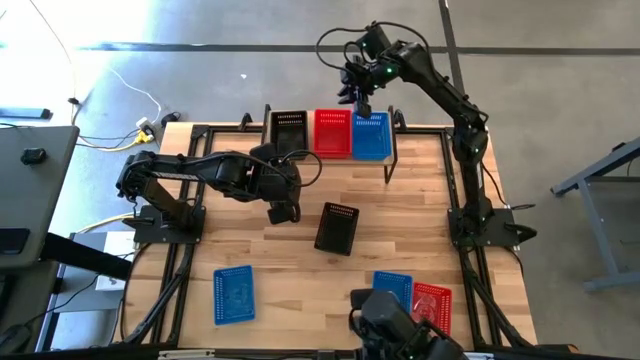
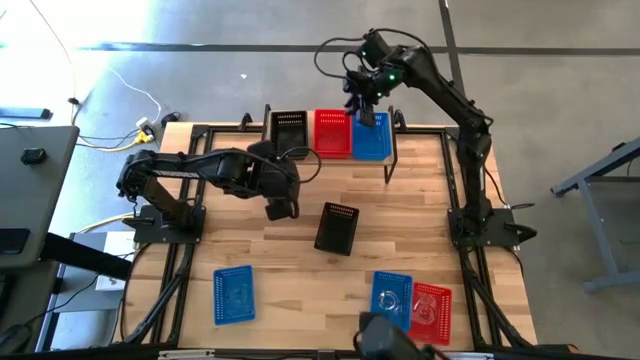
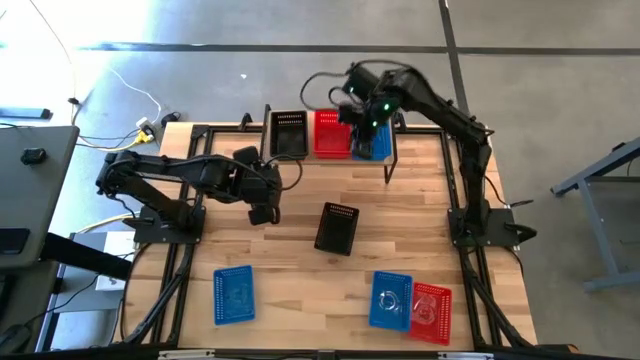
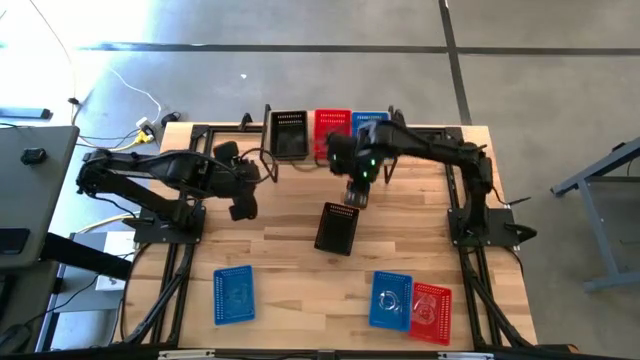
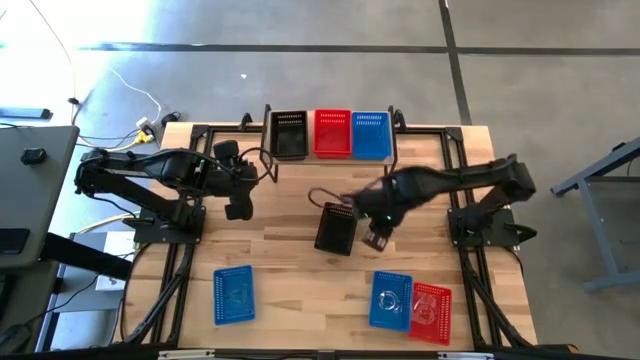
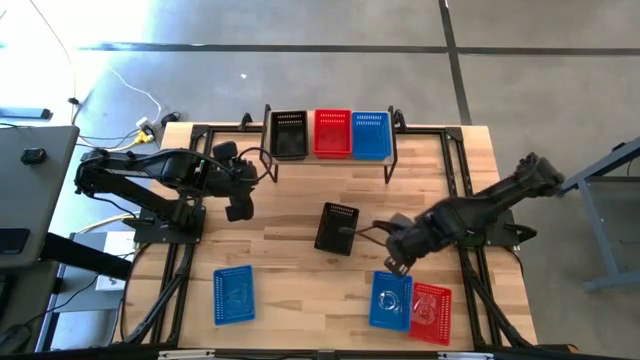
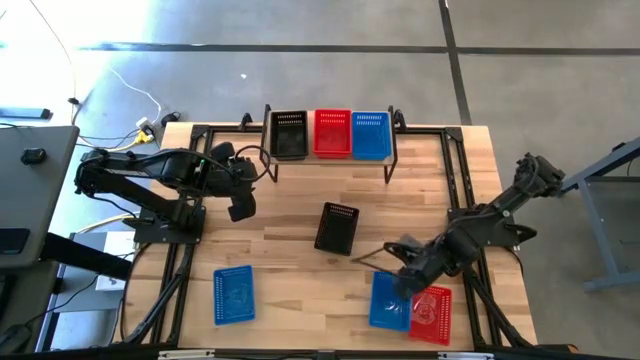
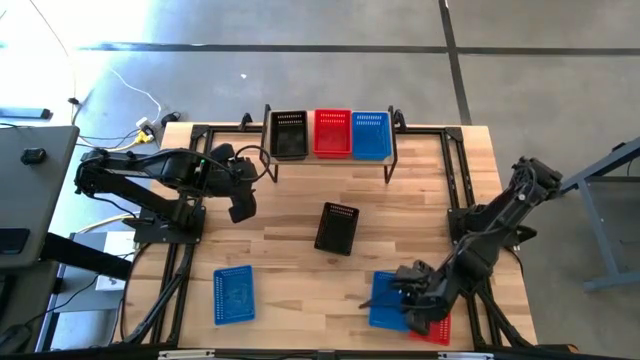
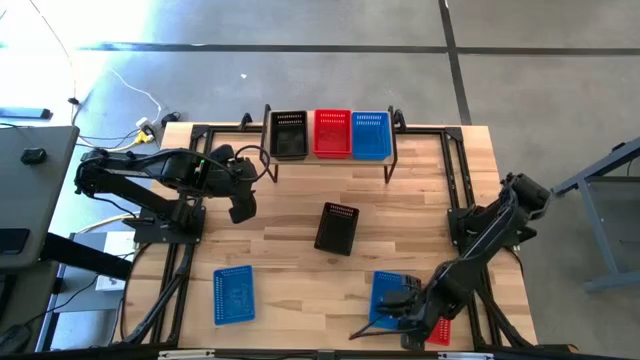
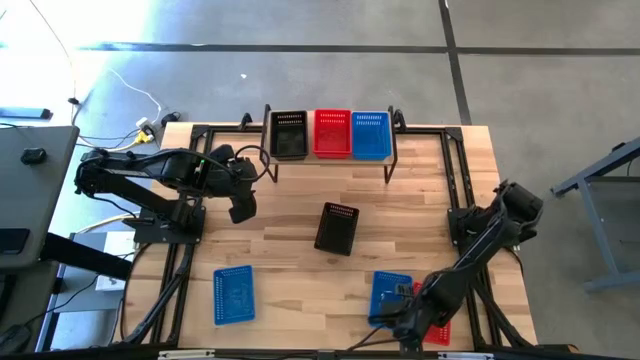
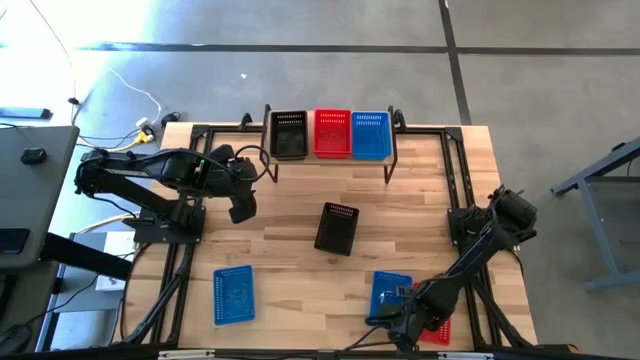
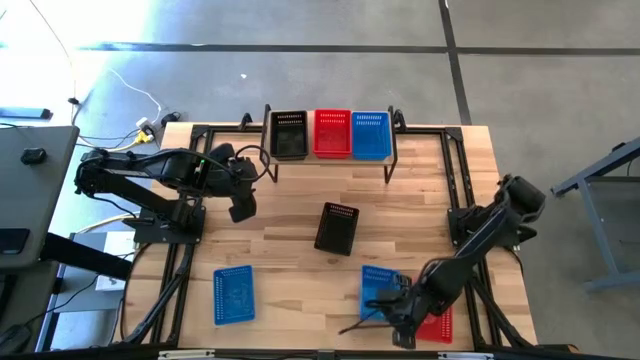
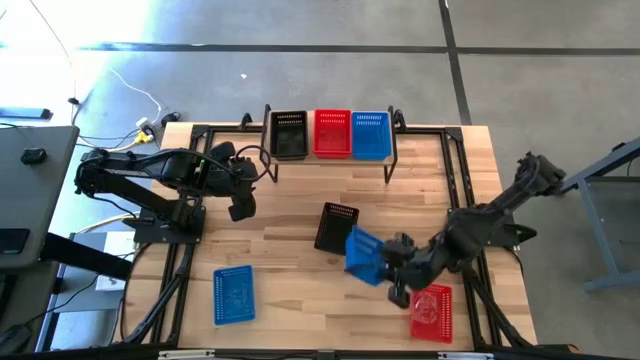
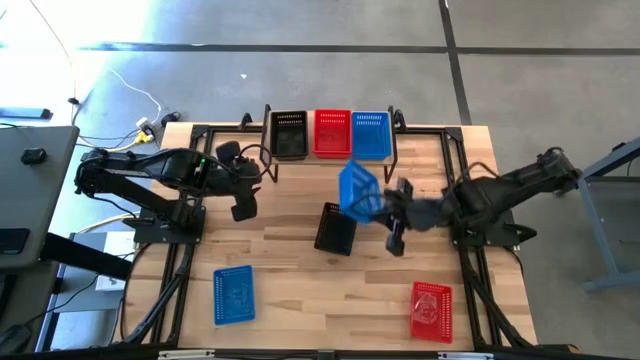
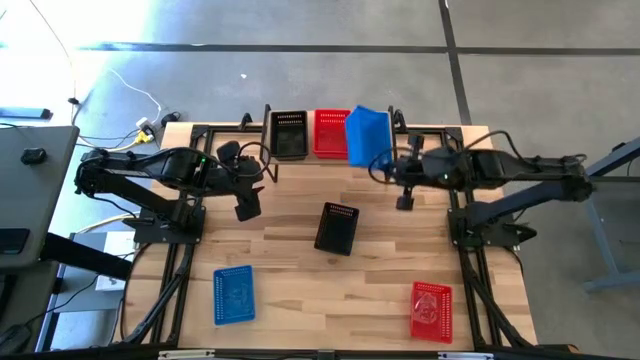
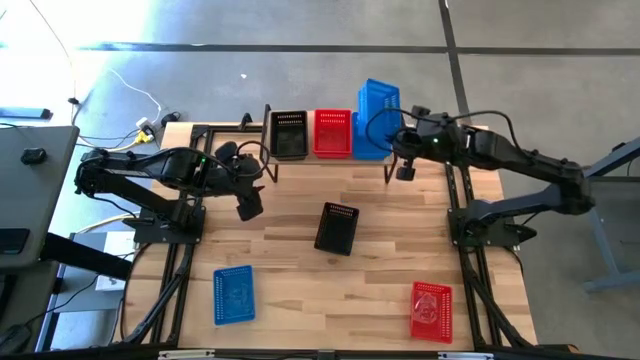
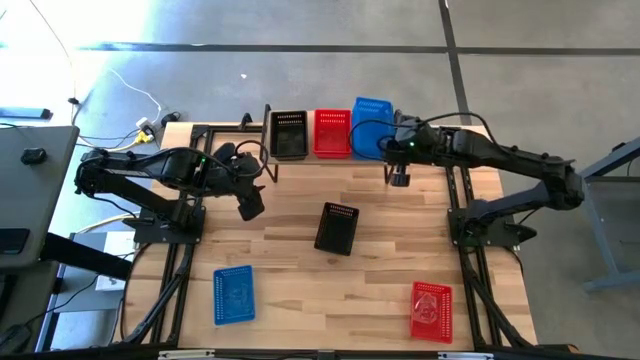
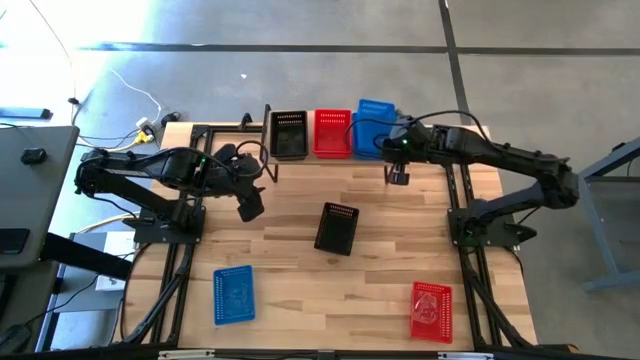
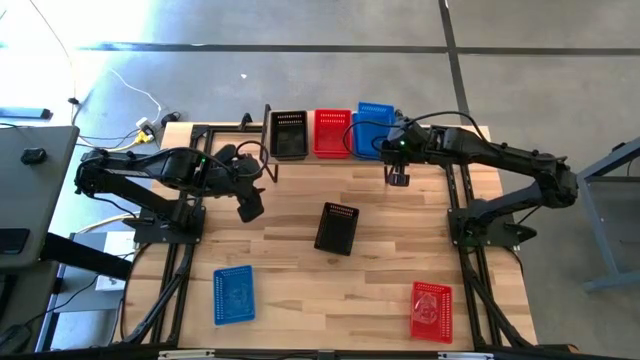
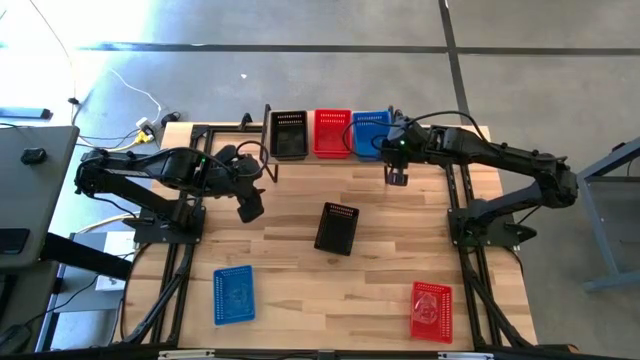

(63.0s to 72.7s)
Task: Stack baskets on shelf by color
Stack the right blue bin on top of the blue bin on the shelf

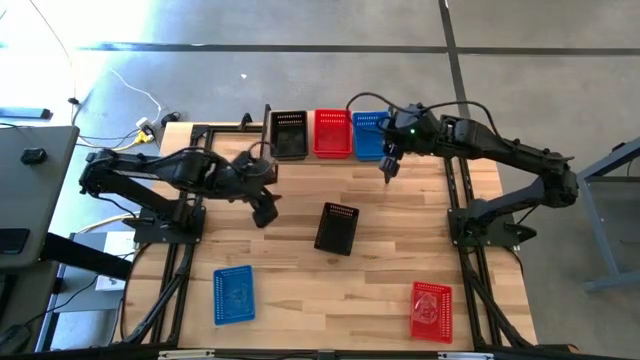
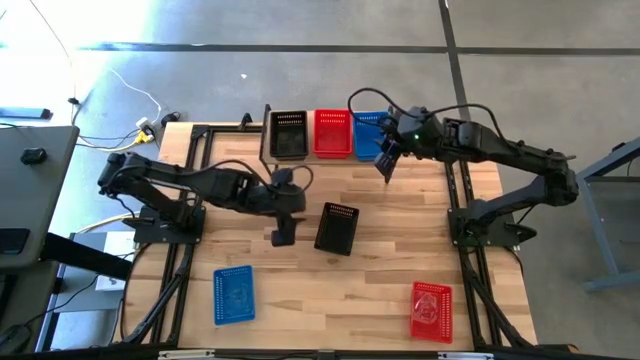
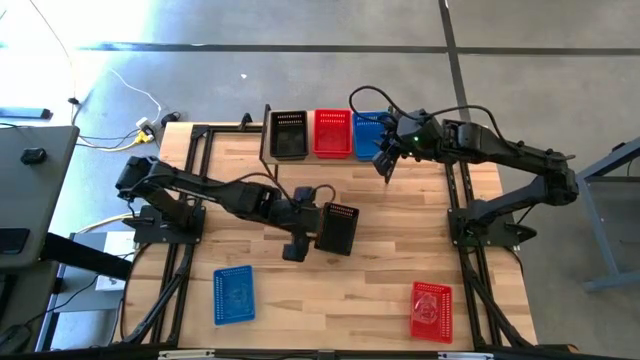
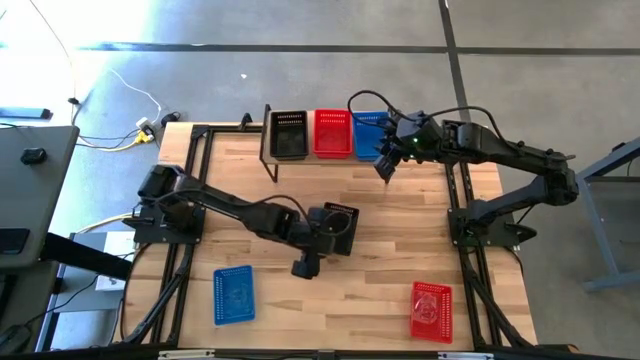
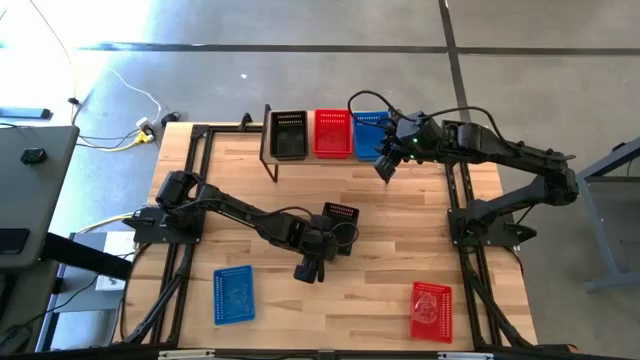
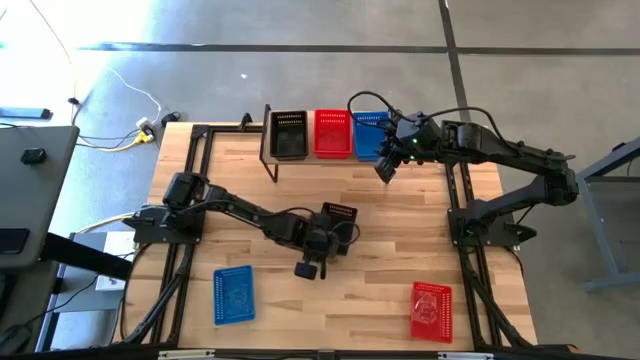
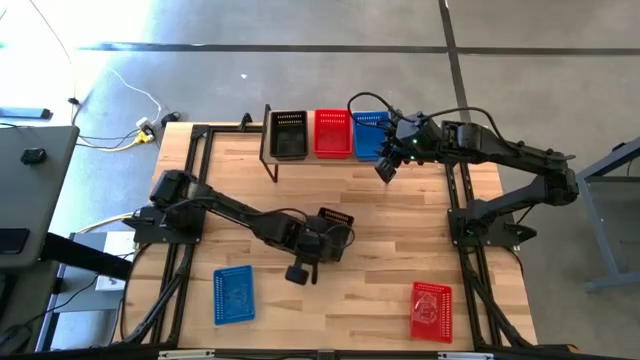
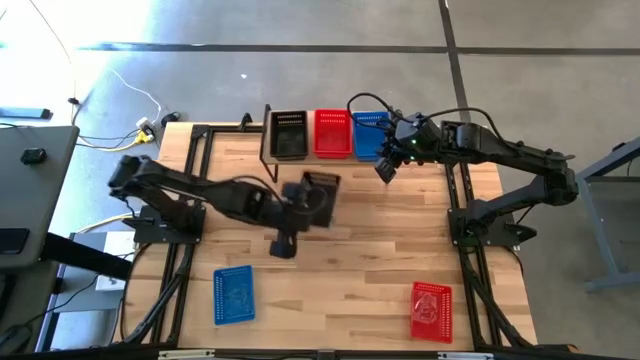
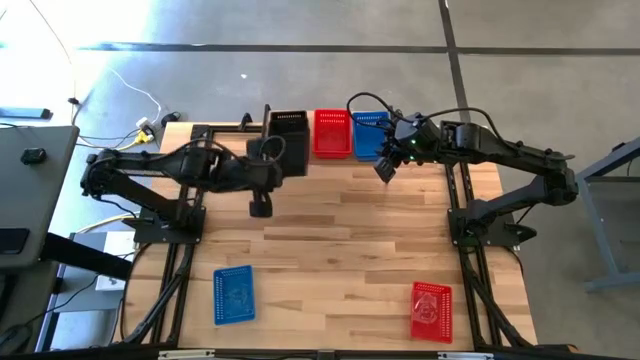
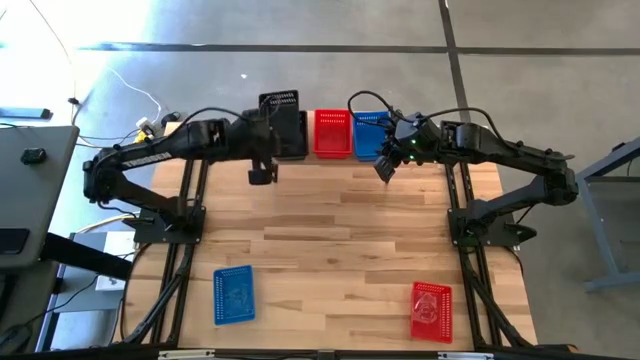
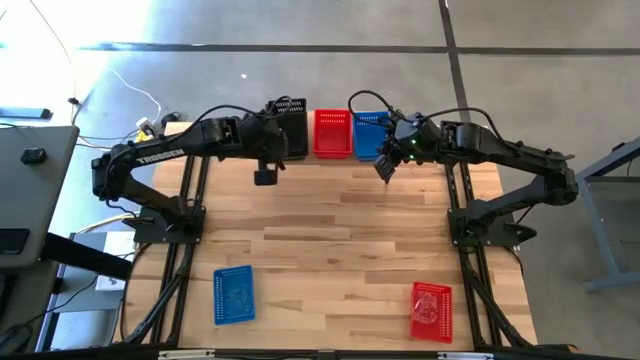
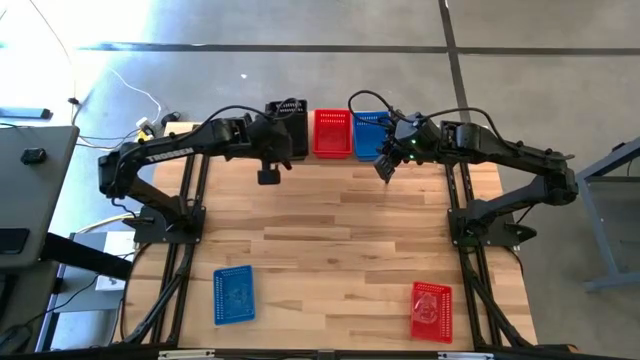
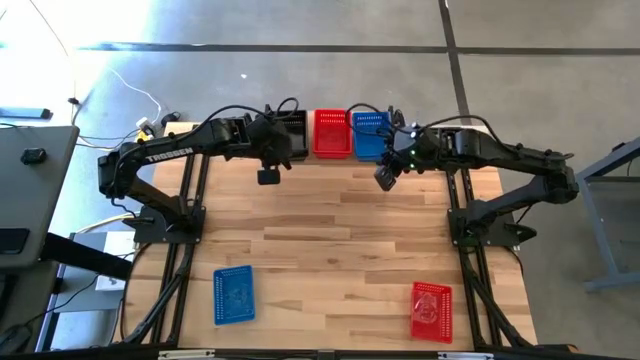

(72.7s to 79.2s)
Stack the black bin on top of the black bin on the shelf

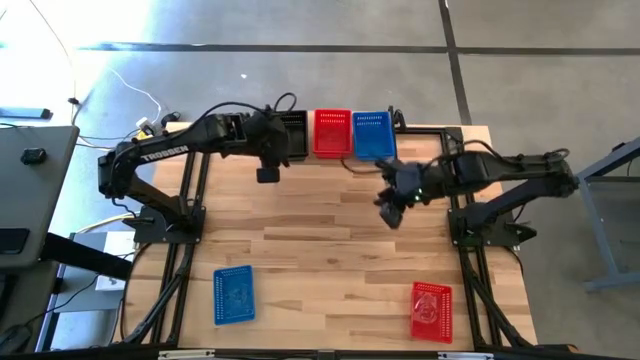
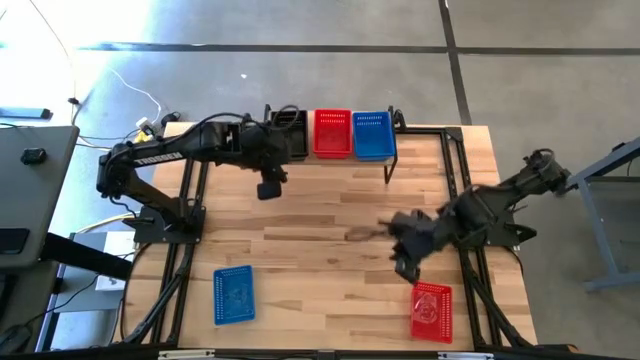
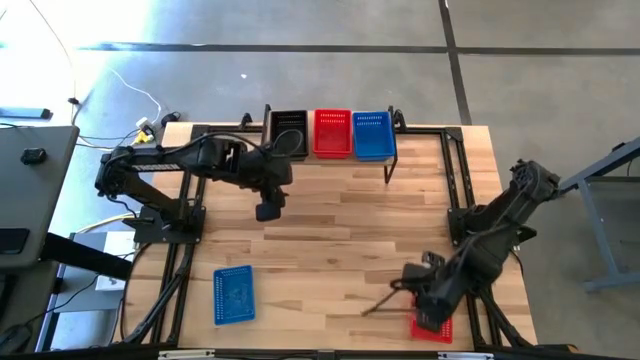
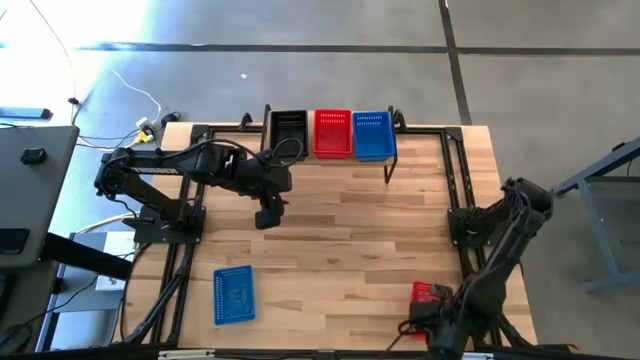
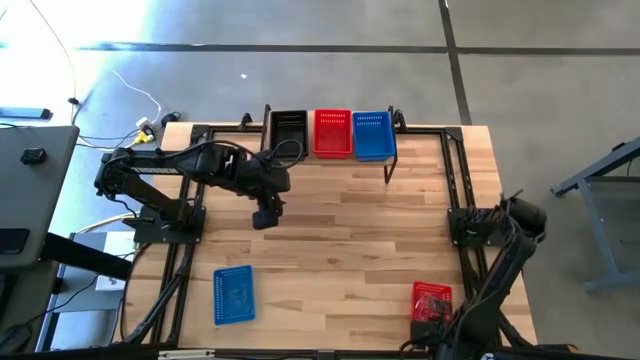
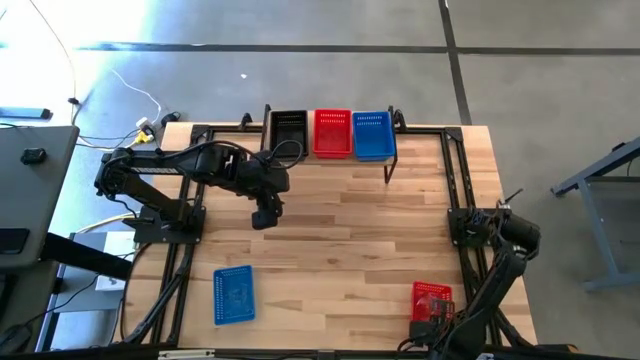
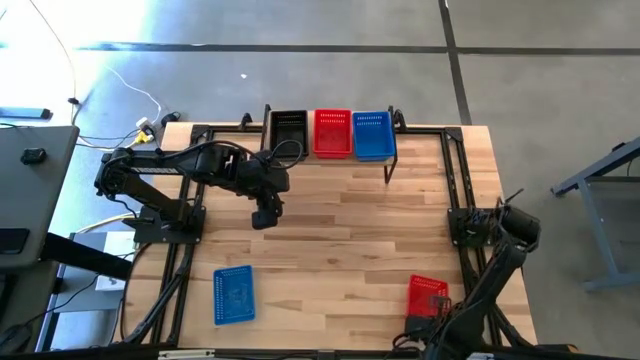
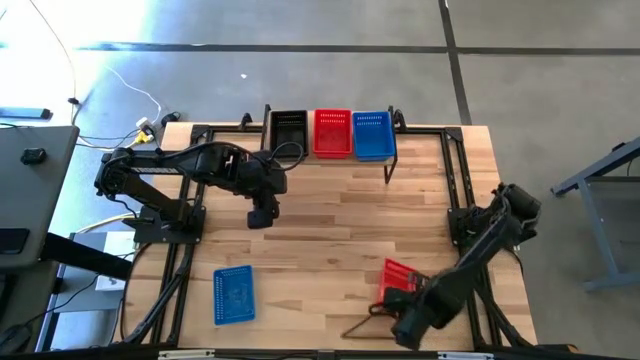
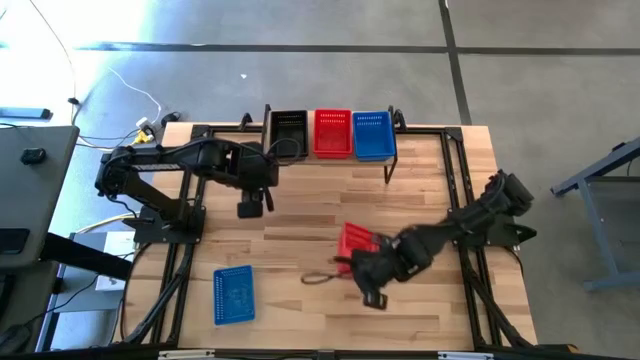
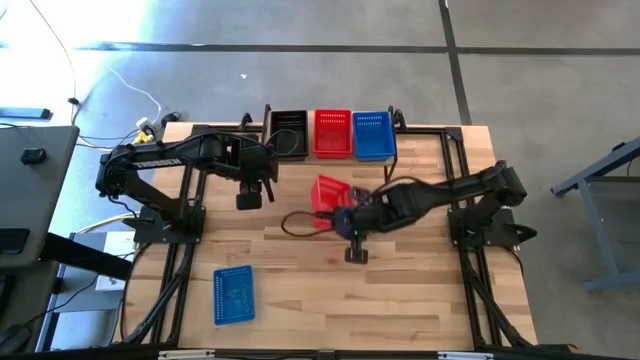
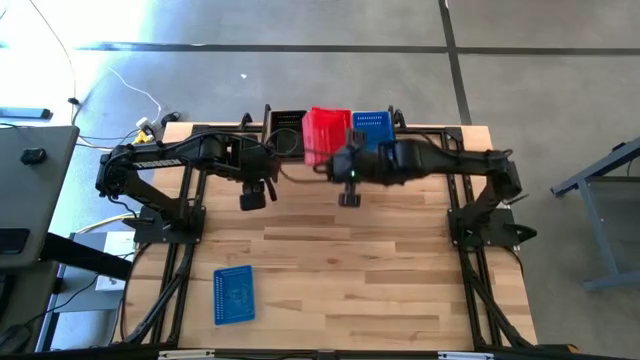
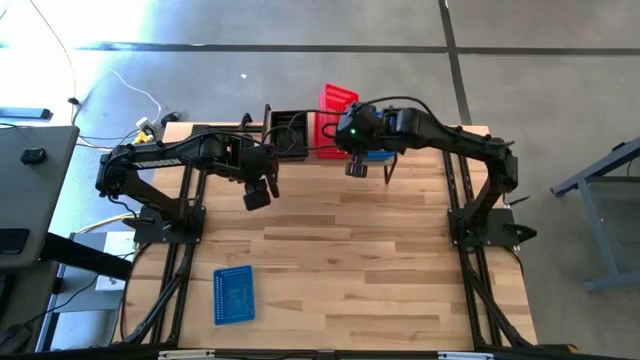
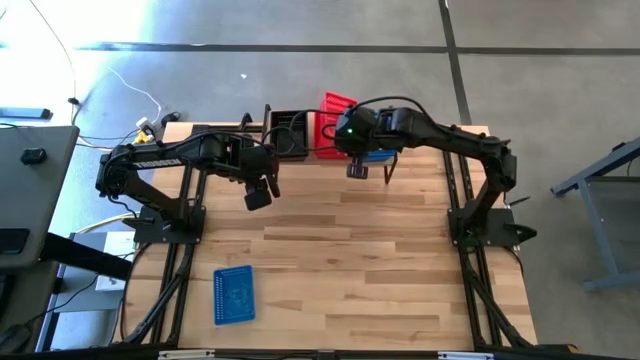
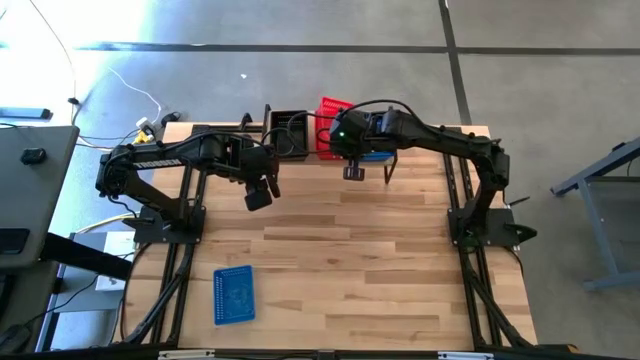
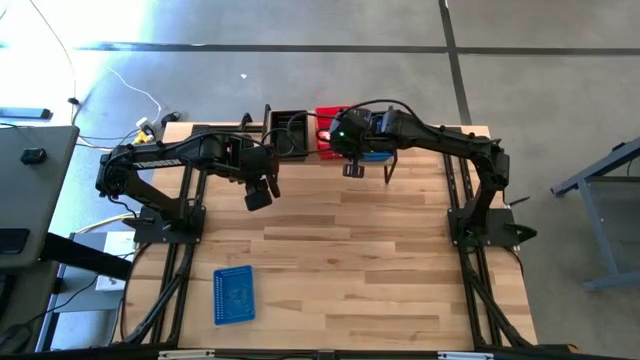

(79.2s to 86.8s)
Stack the red bin on top of the red bin on the shelf
